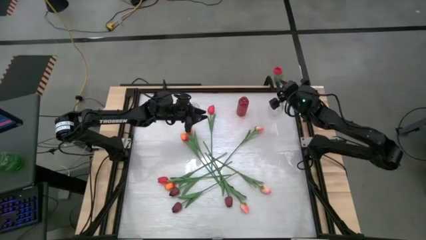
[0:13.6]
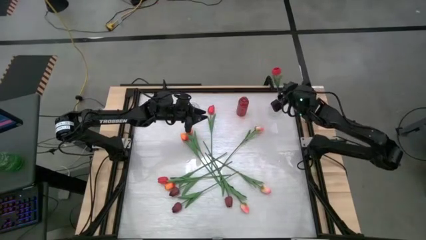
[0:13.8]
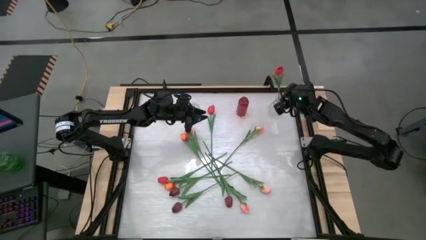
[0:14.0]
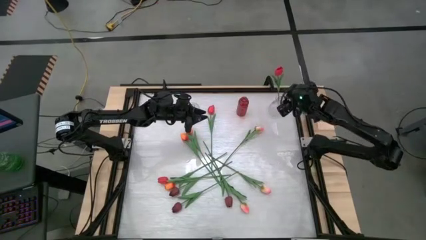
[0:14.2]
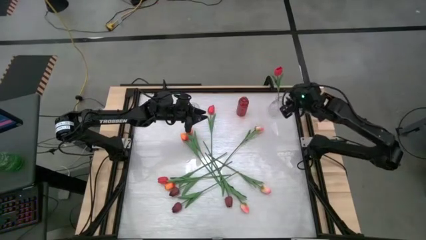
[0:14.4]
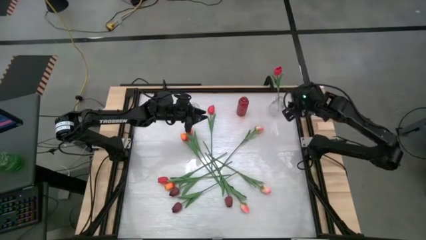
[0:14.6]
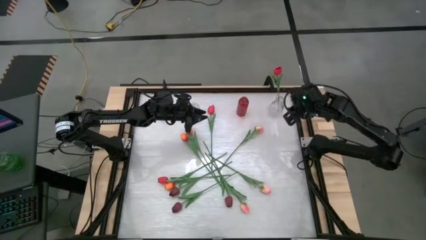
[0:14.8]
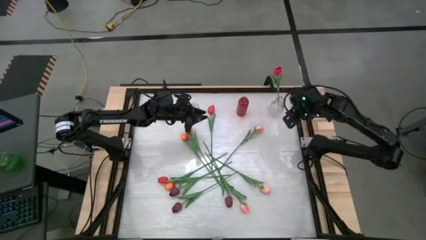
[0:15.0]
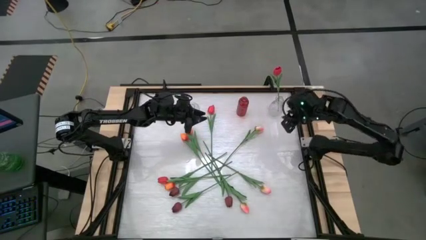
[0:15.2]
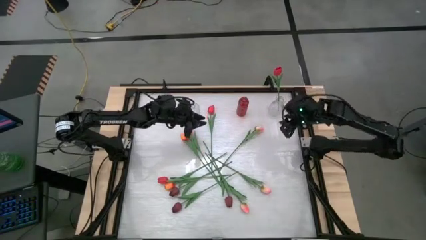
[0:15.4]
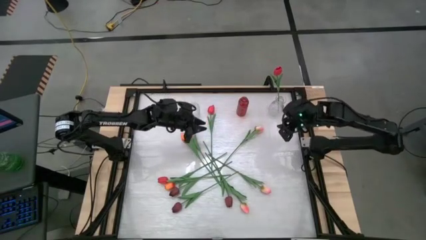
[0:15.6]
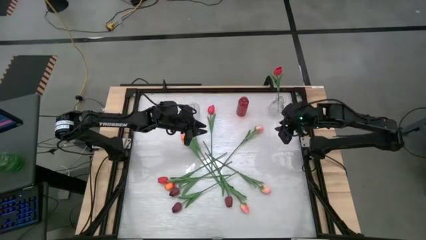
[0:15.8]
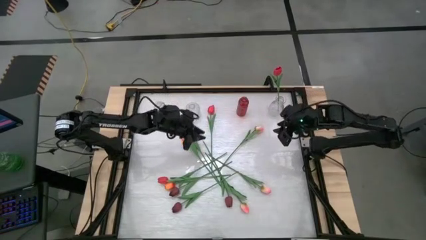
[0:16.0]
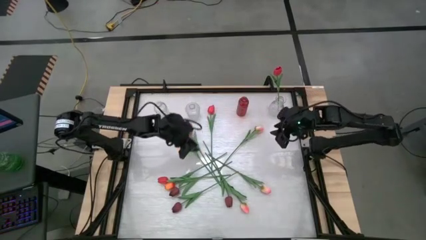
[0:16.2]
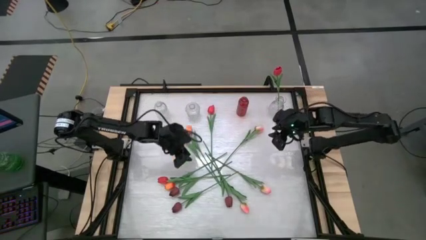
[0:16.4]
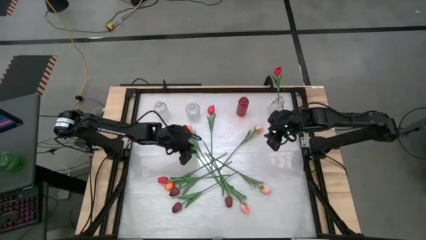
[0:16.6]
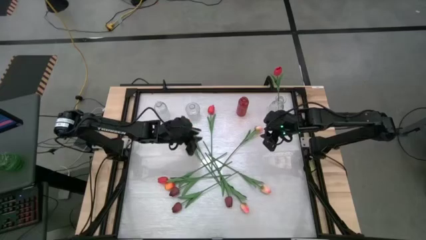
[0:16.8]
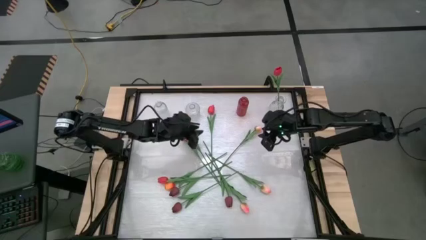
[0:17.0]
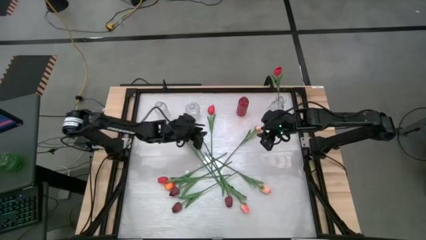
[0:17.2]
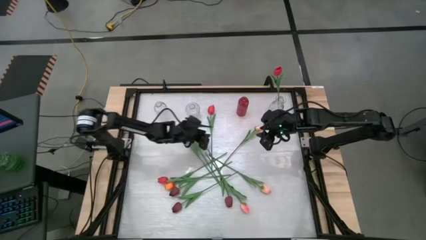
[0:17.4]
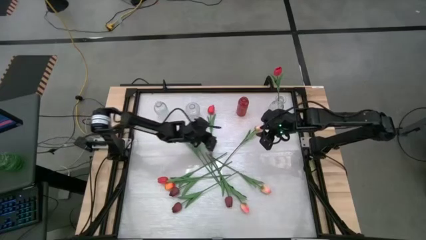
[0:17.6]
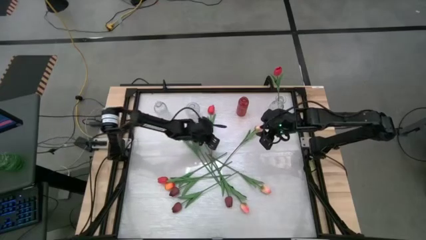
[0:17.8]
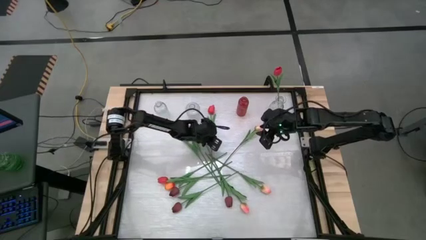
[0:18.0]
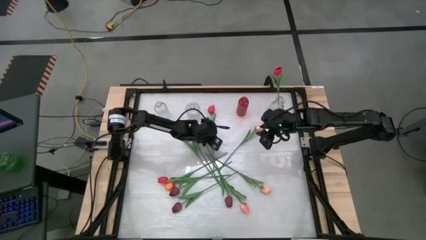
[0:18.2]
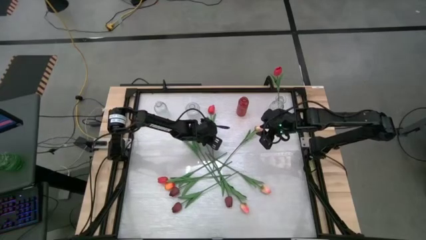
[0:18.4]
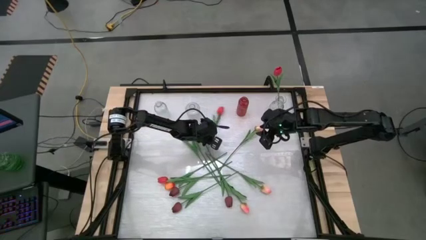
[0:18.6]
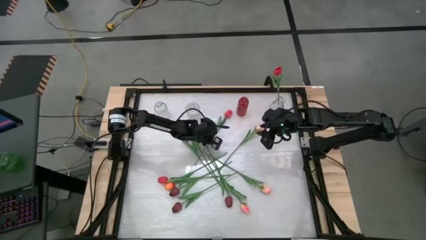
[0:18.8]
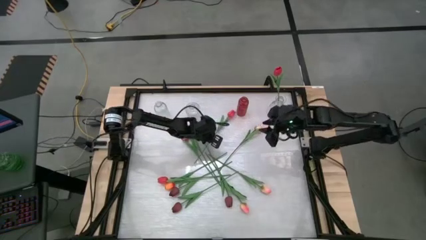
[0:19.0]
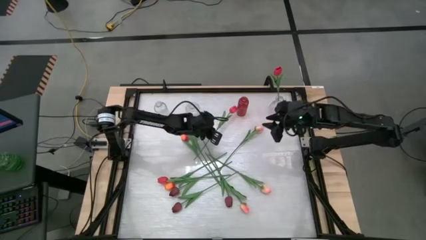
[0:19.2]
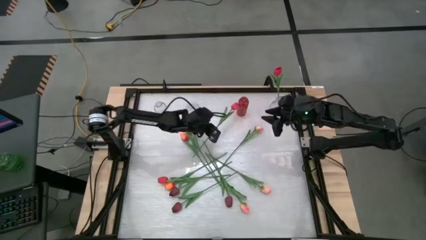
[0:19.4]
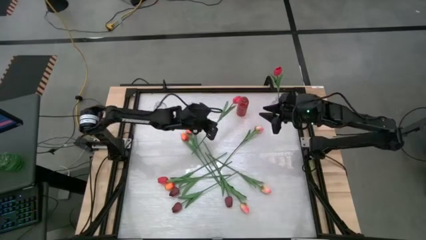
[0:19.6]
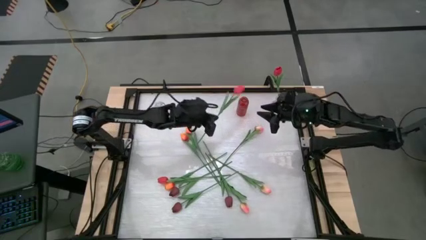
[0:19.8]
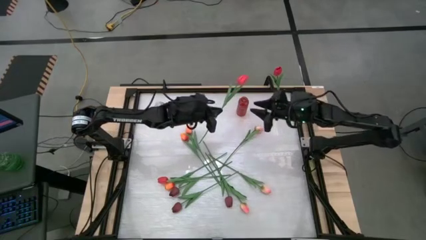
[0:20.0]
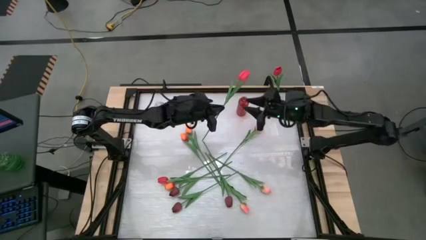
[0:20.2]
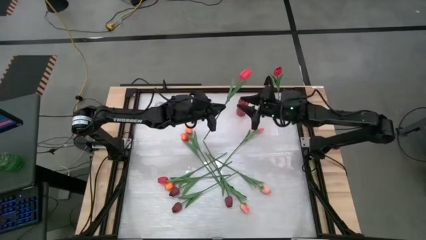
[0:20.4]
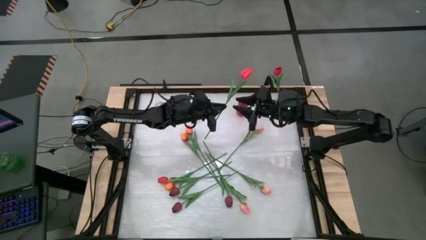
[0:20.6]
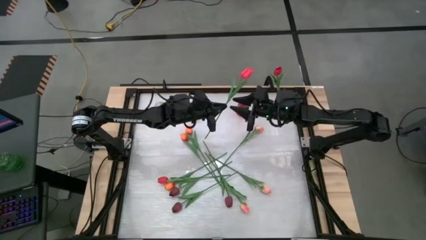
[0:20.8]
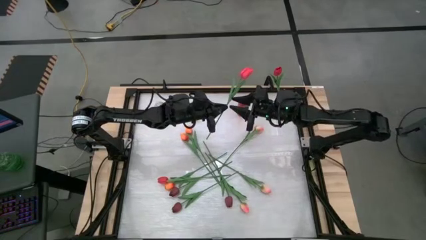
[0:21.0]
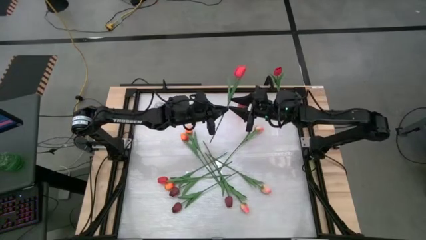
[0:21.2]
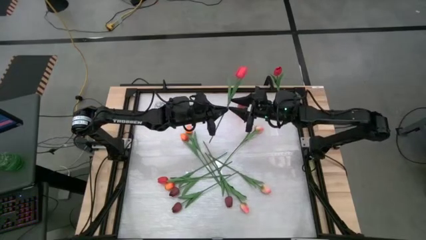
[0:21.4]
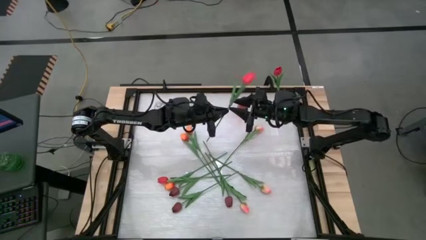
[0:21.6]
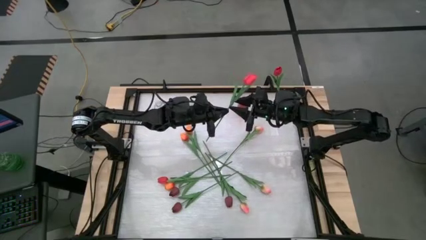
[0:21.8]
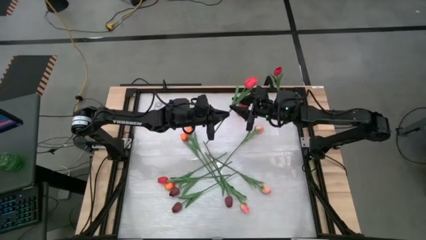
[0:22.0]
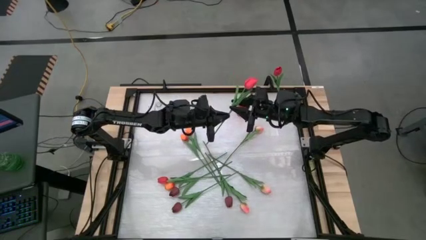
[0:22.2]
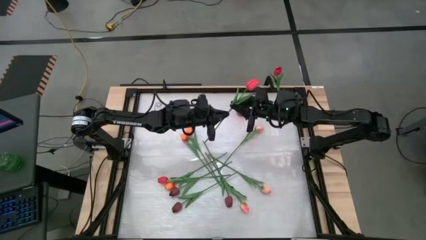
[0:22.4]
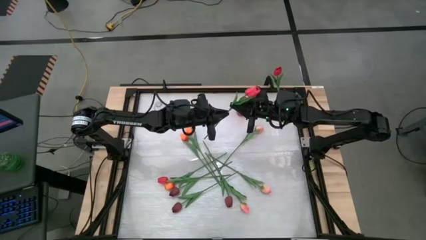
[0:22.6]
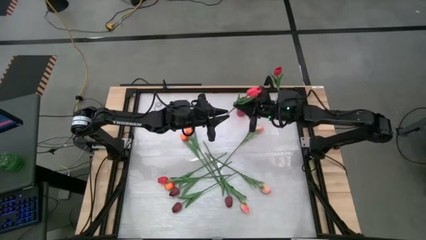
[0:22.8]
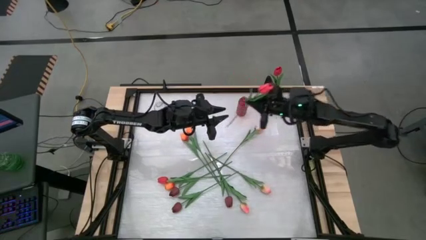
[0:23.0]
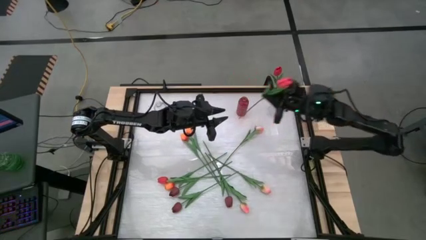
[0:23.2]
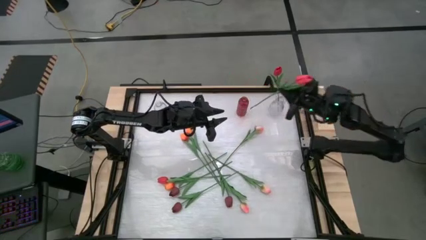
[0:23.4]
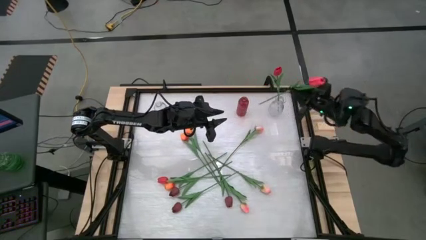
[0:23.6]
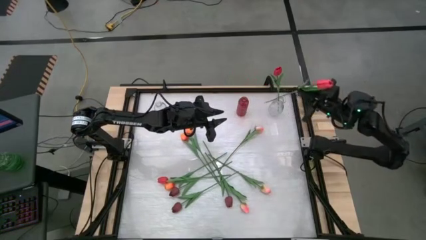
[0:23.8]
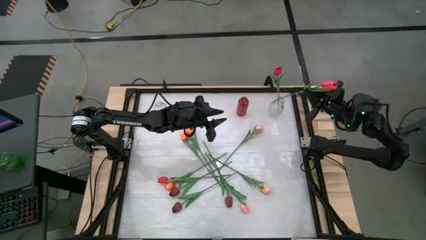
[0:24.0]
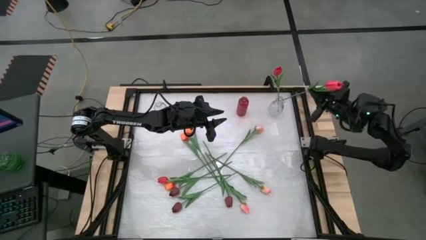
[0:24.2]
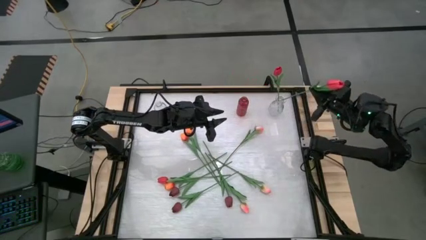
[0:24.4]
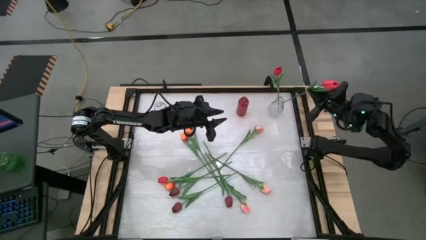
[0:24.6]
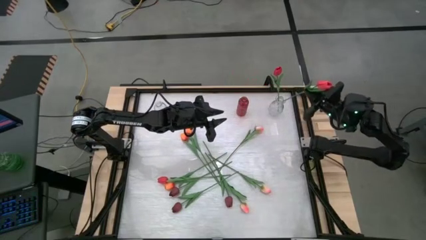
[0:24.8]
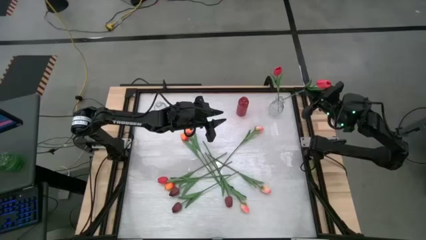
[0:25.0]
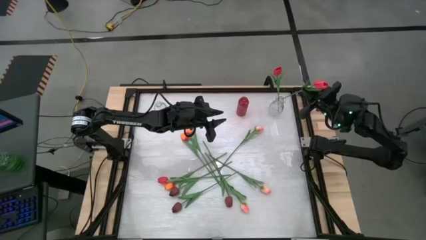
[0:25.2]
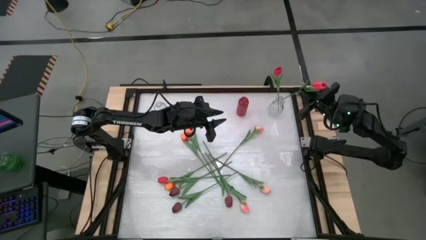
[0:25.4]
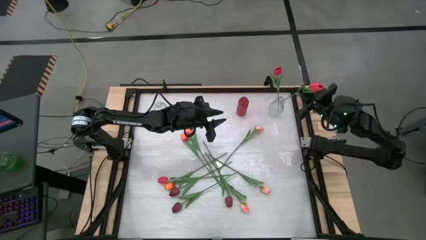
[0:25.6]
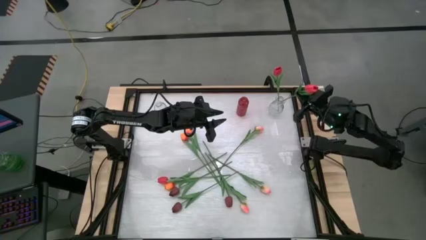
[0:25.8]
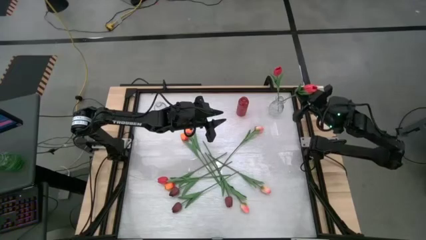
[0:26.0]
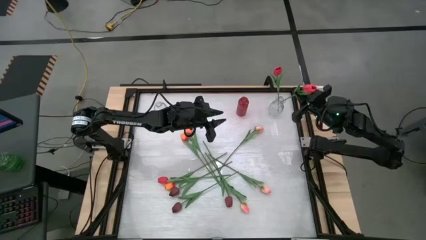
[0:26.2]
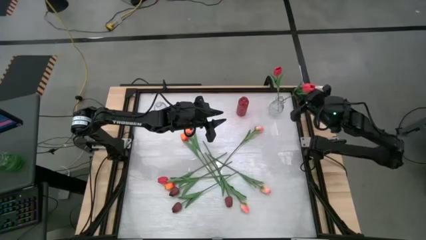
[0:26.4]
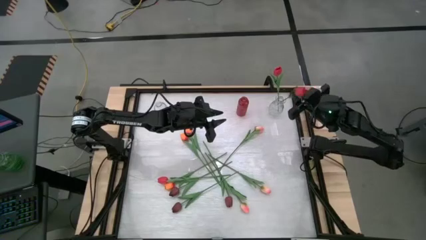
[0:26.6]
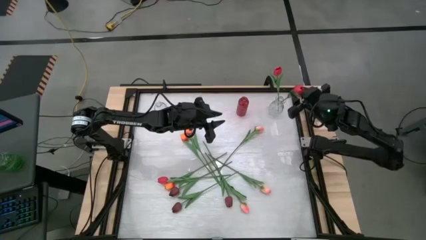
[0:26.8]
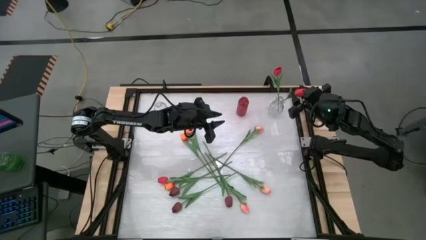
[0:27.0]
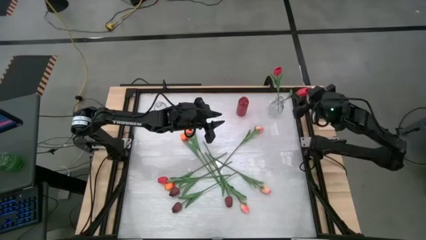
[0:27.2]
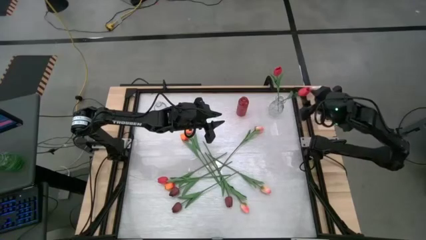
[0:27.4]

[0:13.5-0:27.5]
Task: Sort flowers into vase by color
Put the pink flower into the right transparent vase
